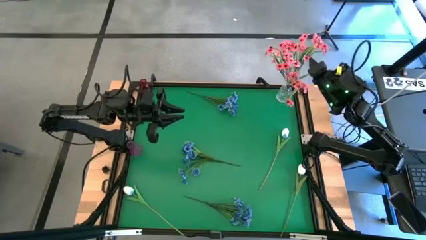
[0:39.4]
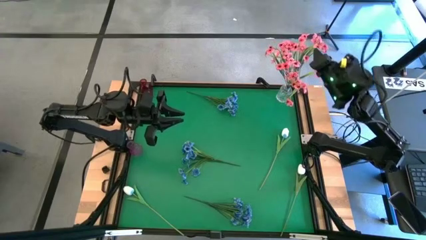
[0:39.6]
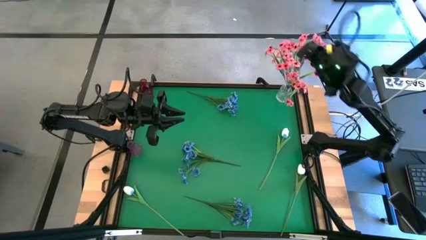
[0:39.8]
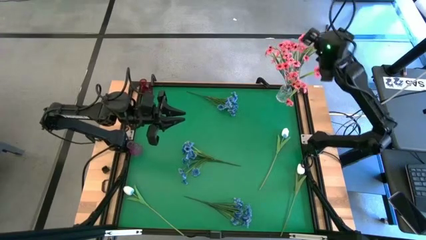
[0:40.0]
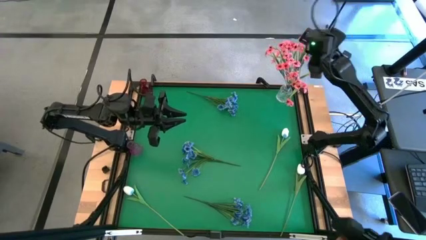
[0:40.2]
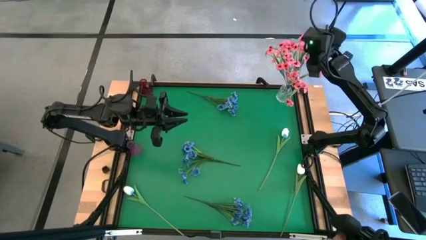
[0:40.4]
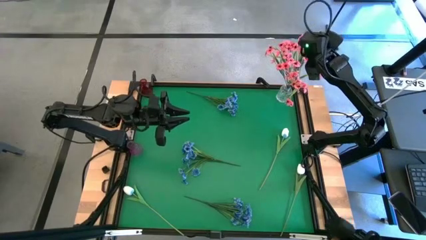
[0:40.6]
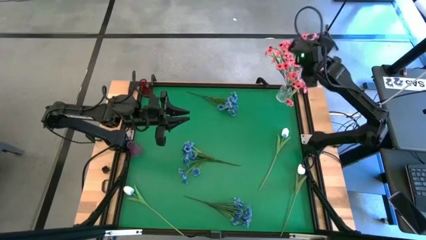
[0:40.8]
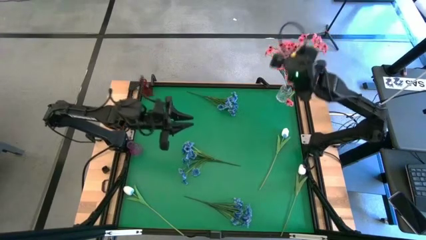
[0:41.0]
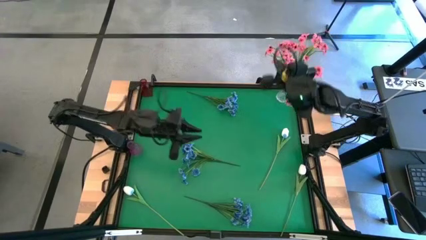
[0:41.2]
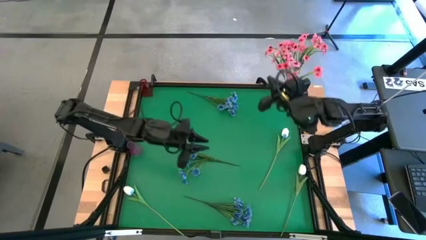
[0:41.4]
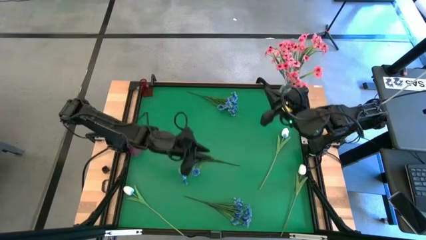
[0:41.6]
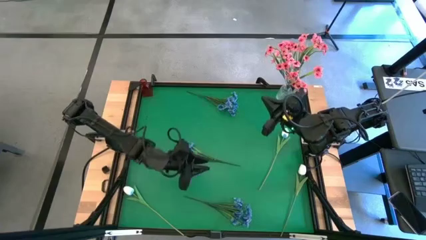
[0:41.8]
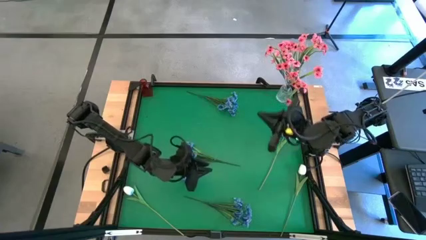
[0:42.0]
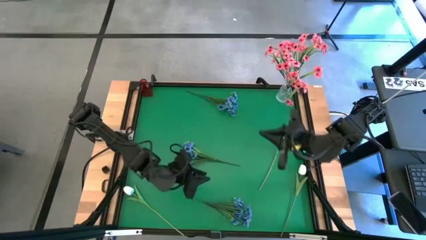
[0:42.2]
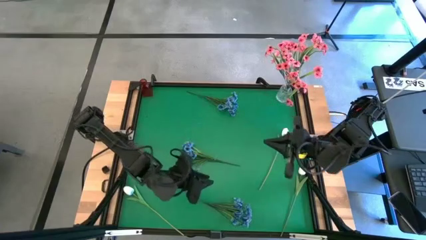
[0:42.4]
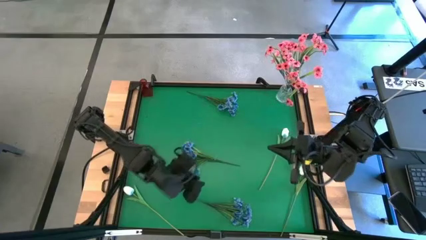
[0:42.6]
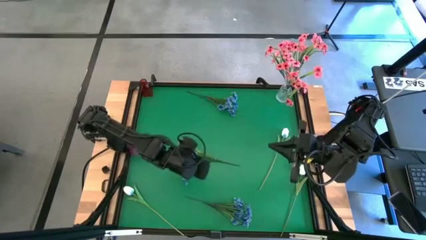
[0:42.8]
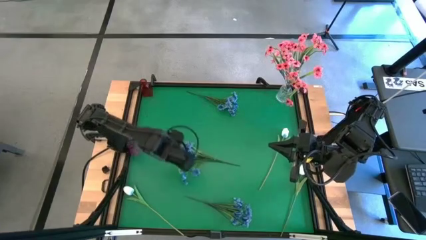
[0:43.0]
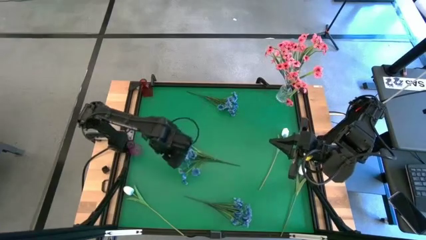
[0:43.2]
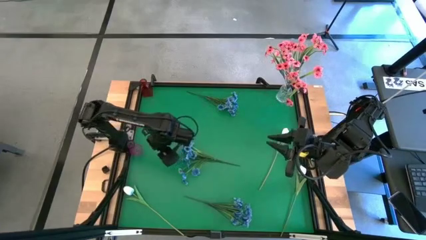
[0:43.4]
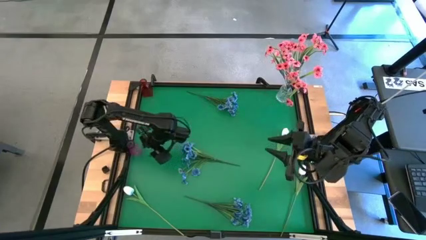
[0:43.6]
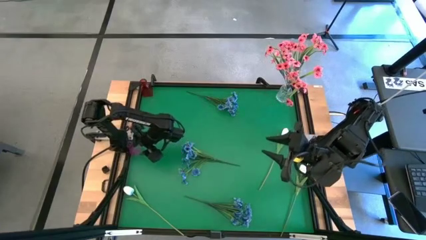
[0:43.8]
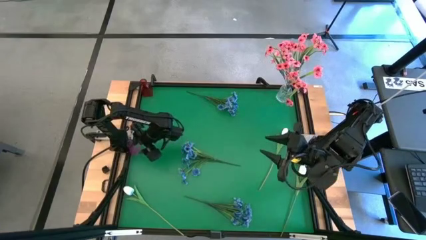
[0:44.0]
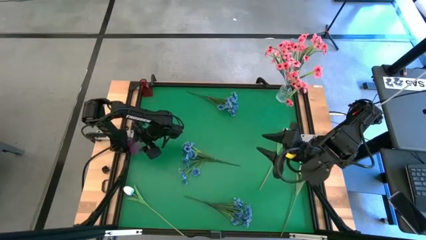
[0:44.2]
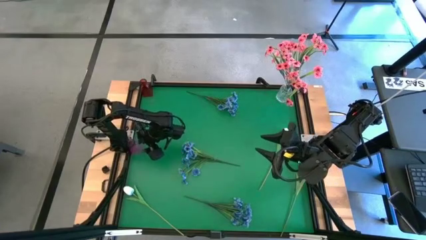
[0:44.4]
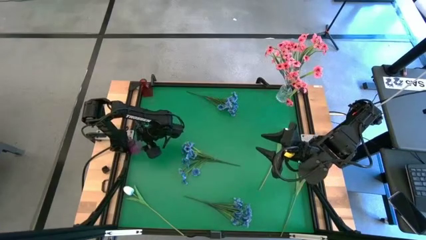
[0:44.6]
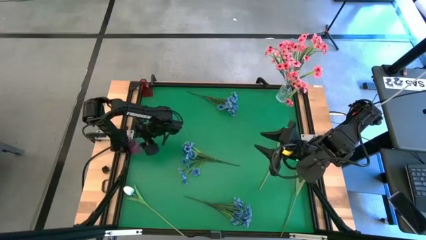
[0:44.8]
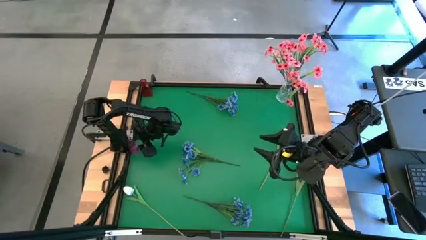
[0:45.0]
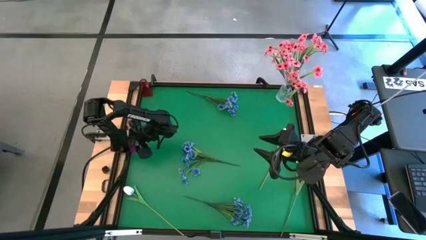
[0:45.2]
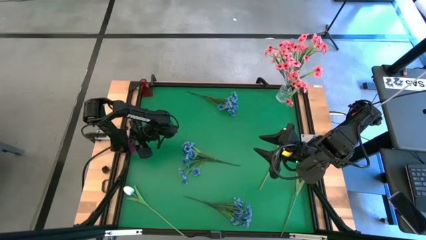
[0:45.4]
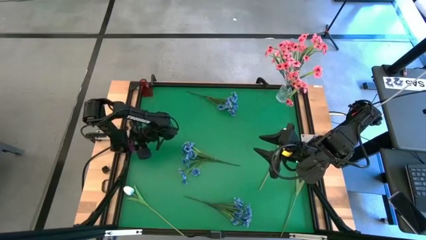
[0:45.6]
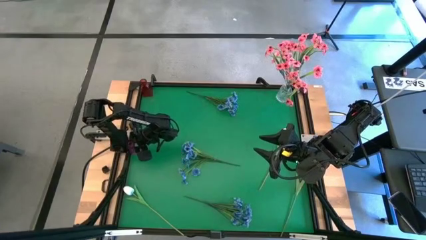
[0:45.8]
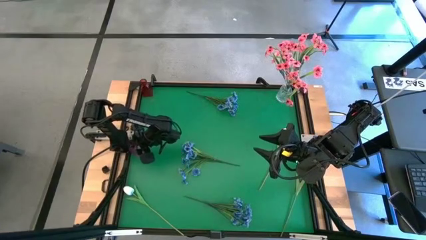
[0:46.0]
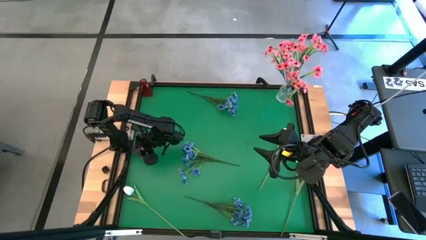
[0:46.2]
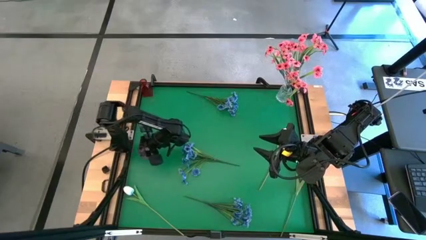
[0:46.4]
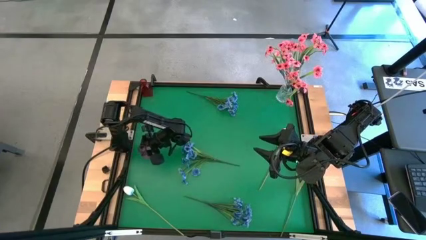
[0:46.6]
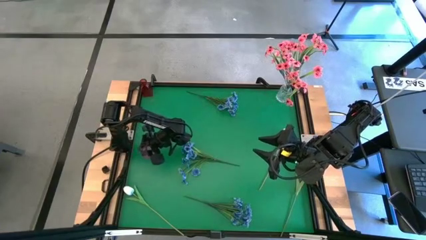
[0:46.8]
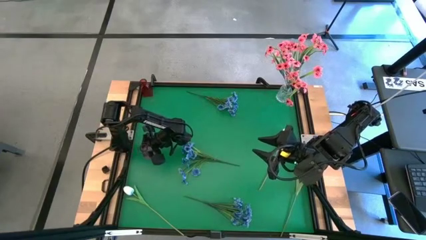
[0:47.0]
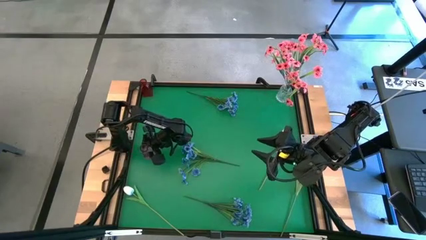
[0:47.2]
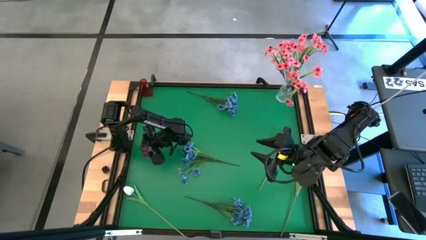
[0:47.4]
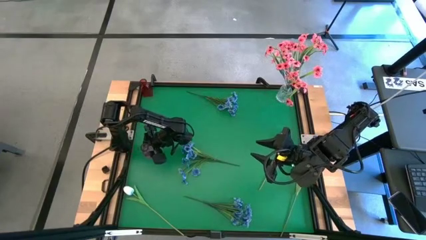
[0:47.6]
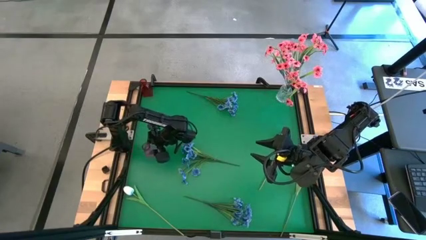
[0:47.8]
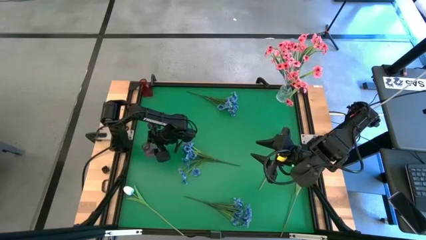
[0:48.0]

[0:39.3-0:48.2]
Task: Sort flowers into vase by color
Adjust the purple vase

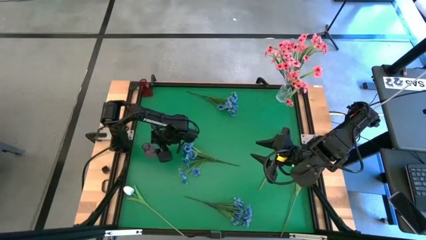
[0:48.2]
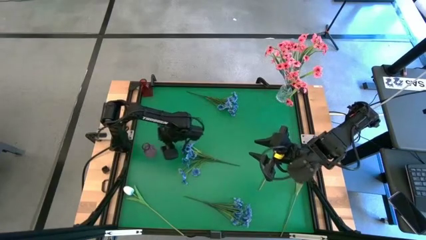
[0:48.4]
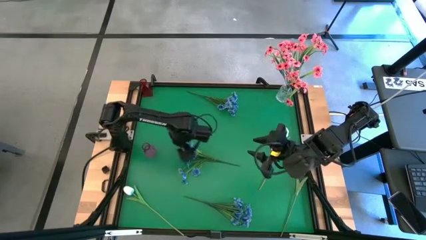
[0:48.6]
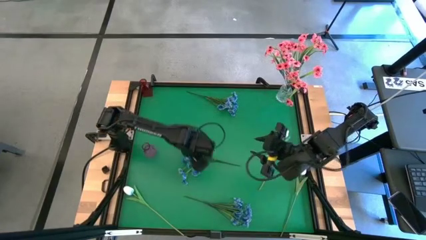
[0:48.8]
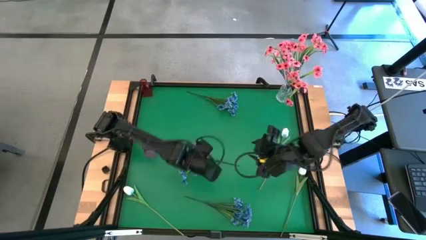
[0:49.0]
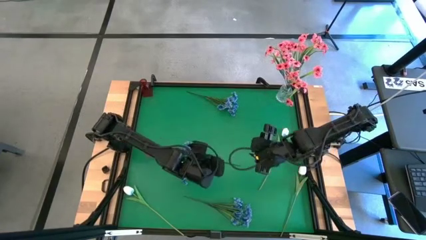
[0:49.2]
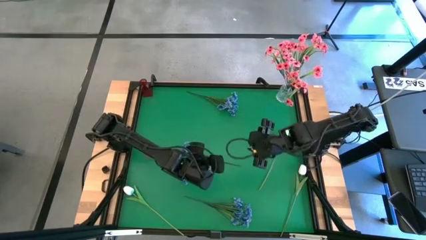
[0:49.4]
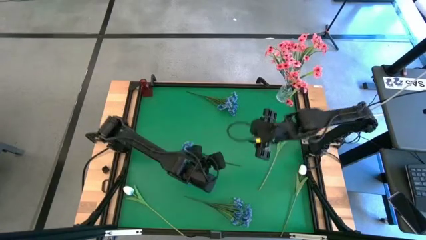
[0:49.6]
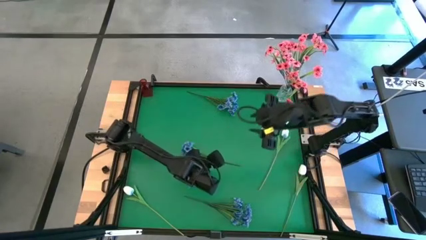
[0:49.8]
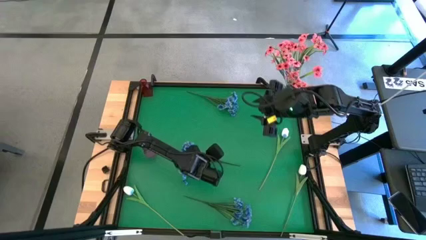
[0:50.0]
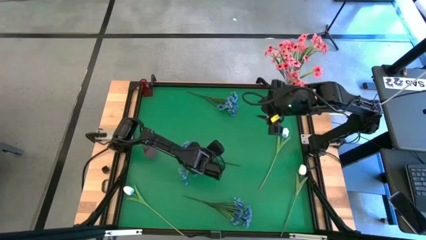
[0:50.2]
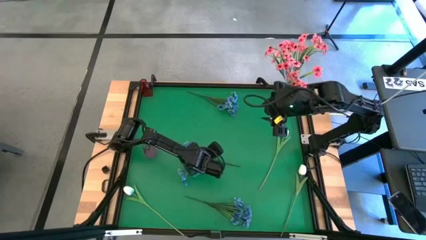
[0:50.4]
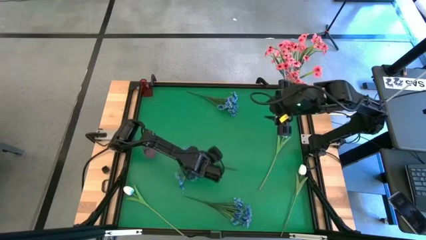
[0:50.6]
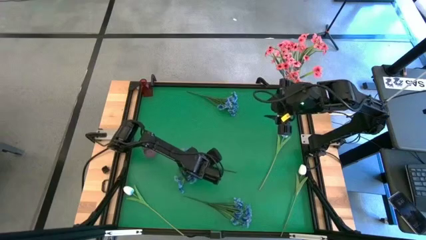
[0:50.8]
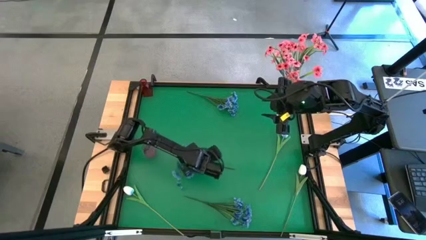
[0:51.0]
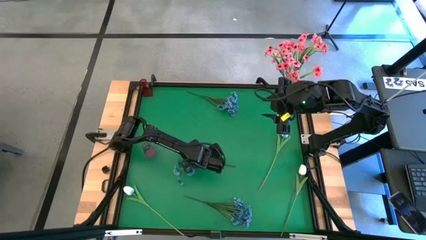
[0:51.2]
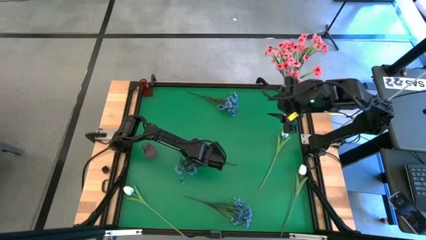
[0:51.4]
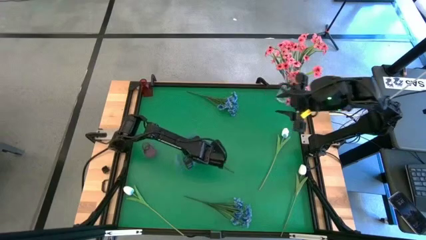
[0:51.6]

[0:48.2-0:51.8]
Put the middle blue flowers into the red vase
